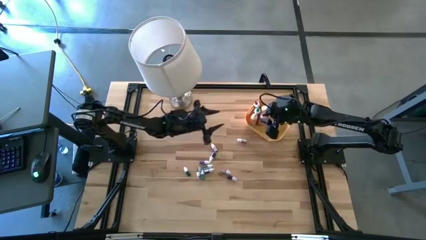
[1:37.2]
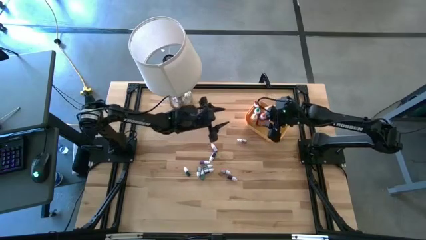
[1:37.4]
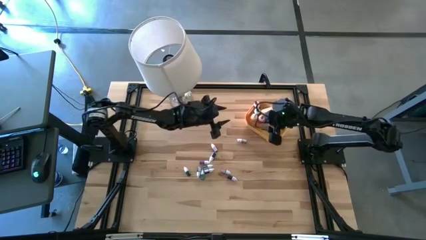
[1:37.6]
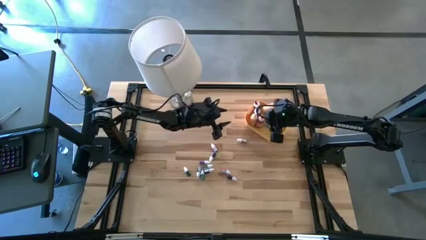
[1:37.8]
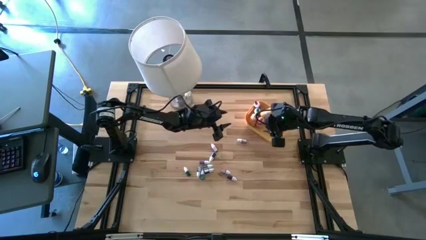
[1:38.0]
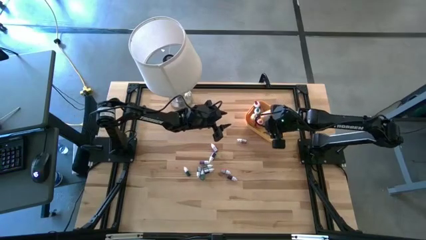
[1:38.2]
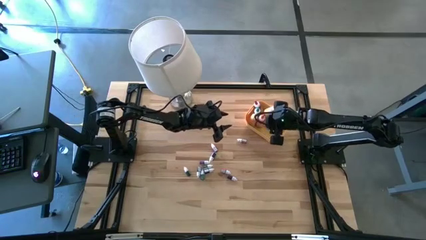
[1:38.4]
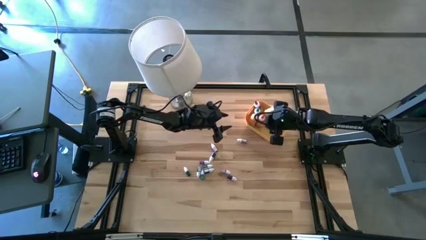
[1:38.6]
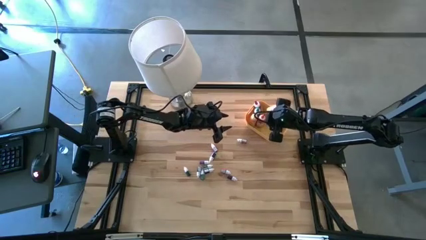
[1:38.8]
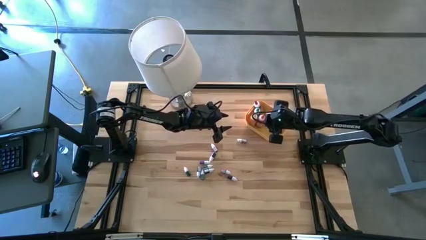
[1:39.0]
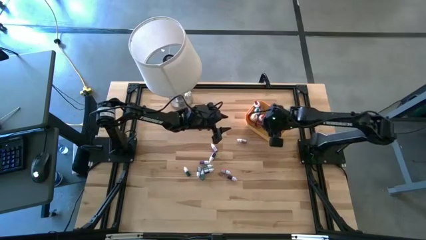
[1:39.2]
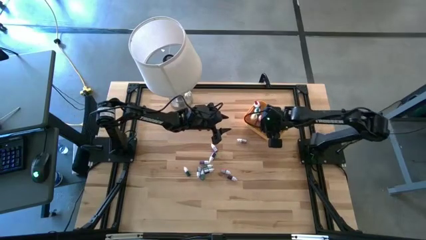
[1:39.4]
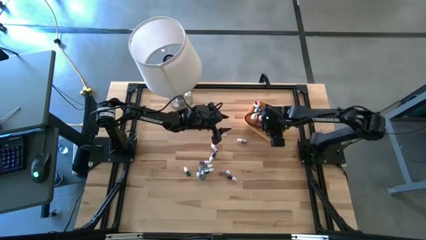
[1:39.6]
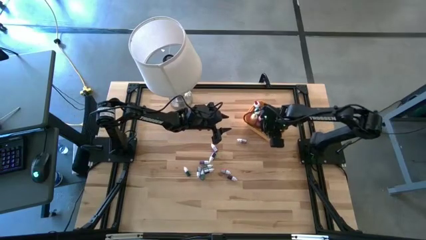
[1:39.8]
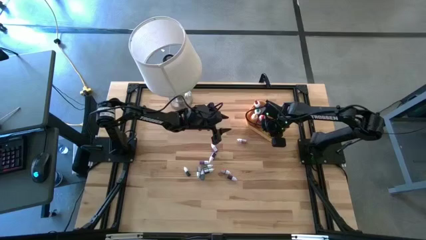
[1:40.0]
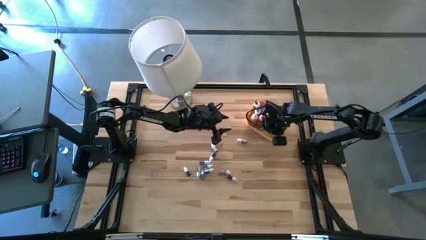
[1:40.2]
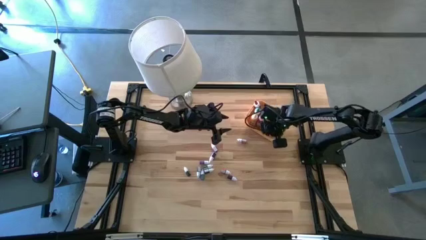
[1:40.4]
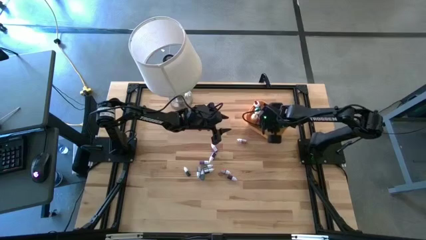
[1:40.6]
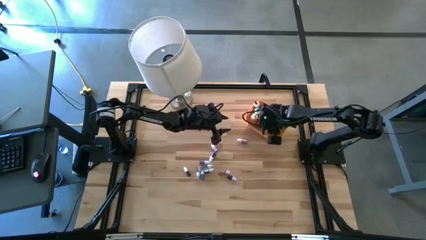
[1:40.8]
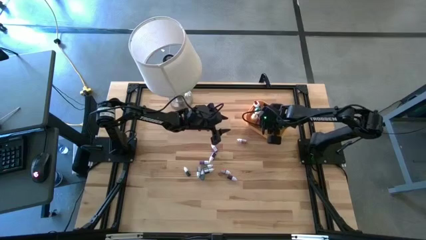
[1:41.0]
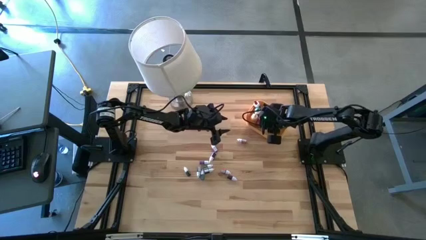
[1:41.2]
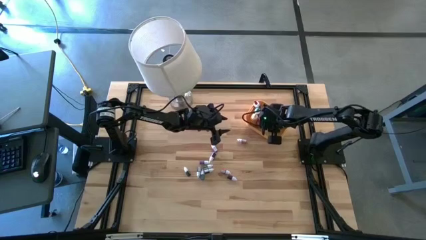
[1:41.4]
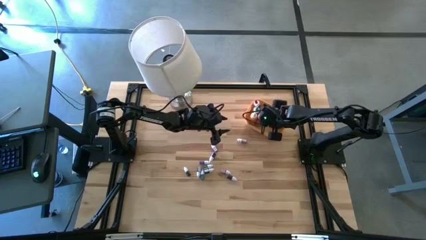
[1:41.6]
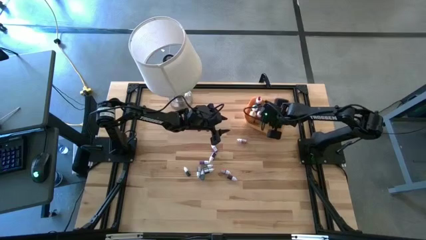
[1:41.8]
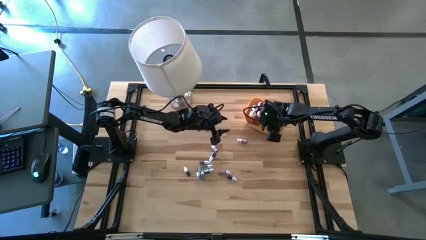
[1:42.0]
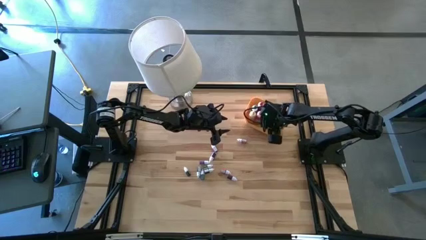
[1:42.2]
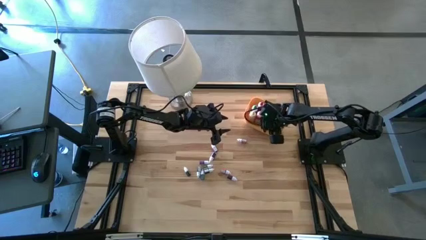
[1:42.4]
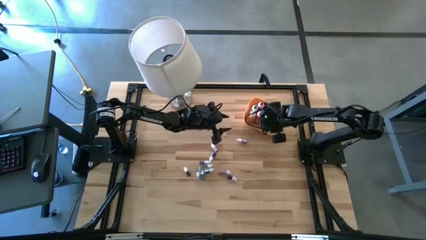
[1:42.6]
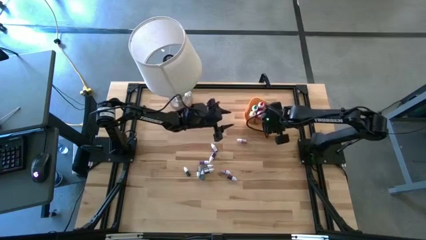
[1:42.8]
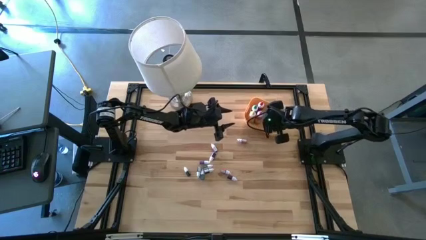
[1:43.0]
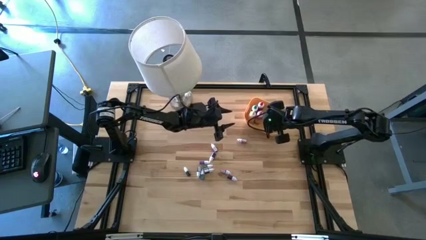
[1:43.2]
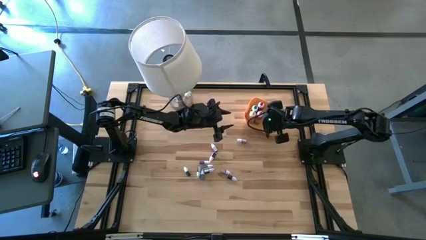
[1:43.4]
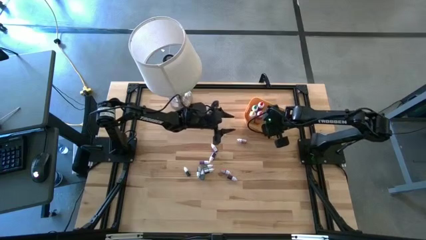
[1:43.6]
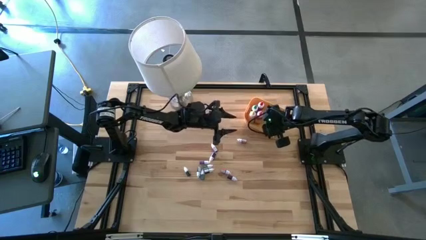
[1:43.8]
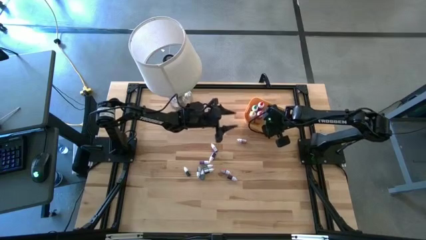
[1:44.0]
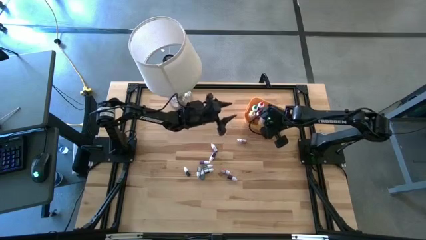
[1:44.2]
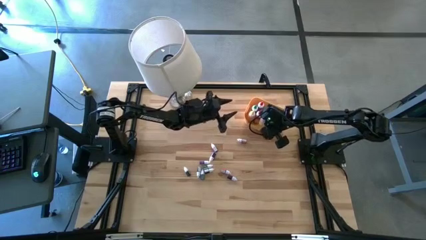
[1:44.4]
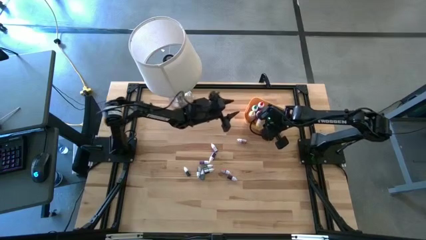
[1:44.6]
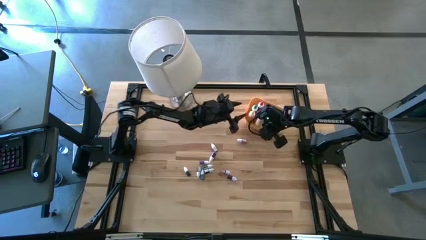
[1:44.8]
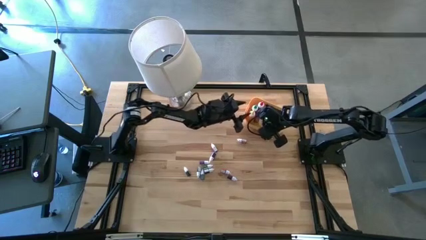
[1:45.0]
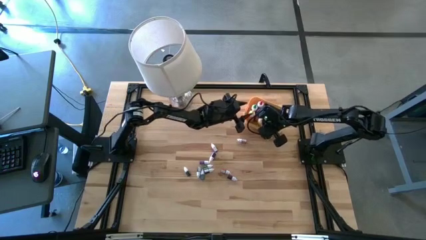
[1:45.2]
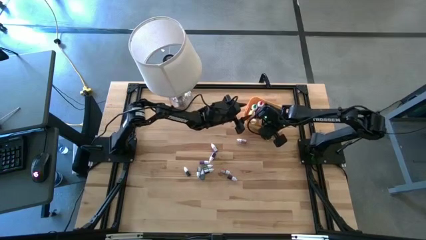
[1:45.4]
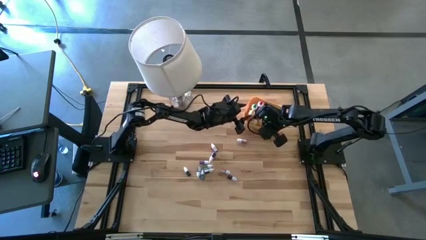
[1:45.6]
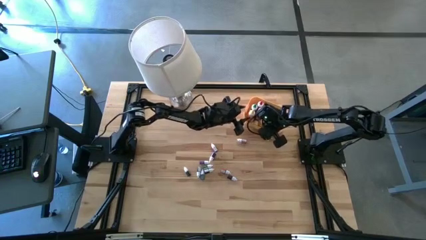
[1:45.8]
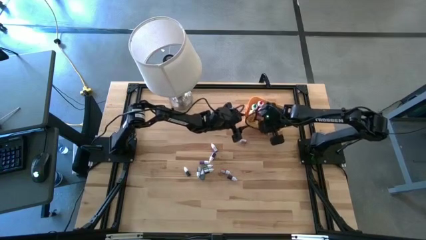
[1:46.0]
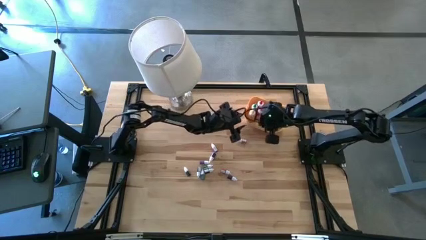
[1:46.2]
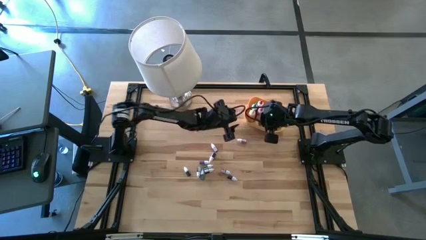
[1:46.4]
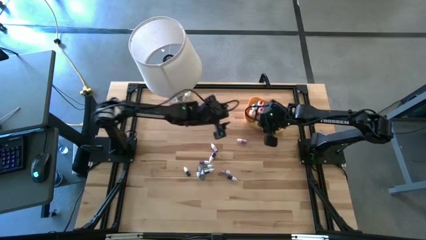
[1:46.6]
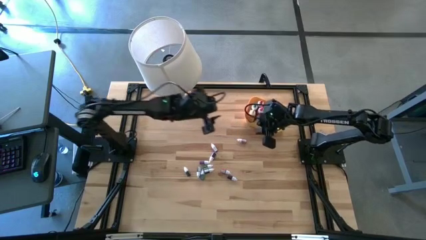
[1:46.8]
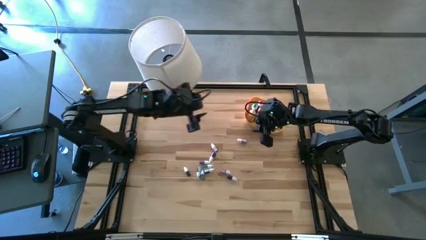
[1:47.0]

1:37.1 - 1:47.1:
Task: Pick & Place food coloring
Adjust the large yellow food coloring bottle in the yellow bin

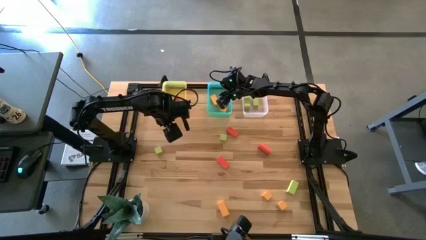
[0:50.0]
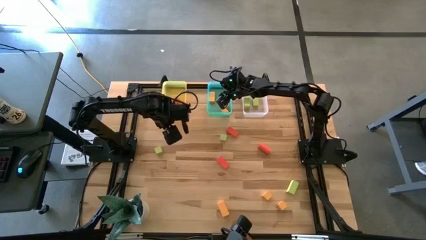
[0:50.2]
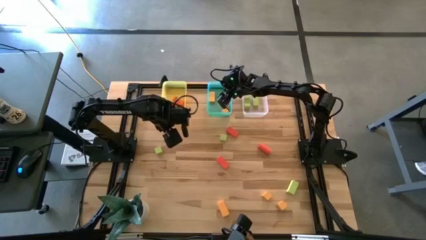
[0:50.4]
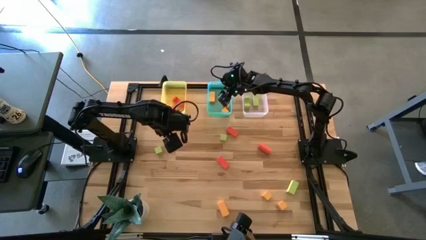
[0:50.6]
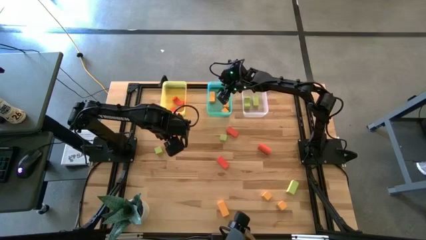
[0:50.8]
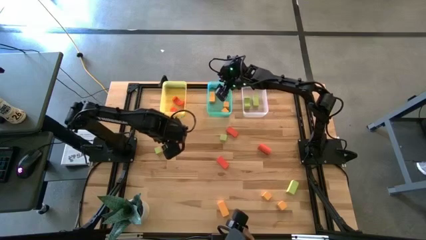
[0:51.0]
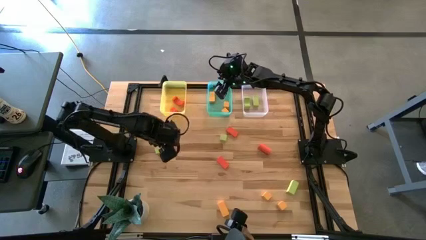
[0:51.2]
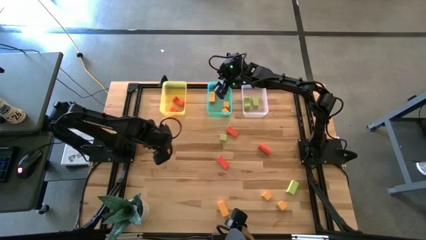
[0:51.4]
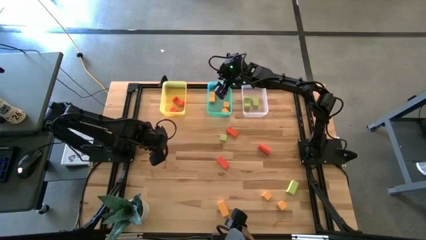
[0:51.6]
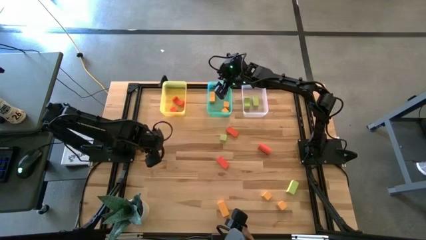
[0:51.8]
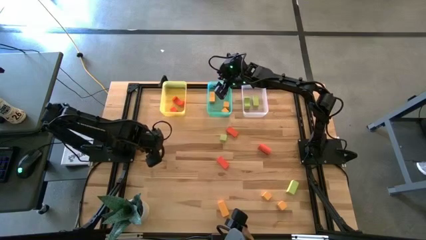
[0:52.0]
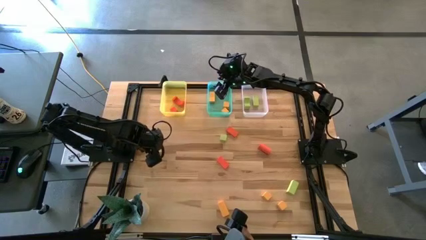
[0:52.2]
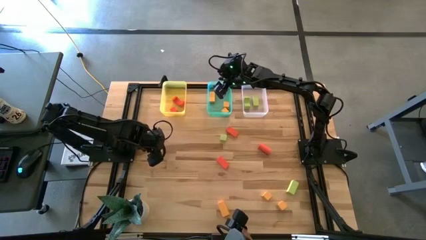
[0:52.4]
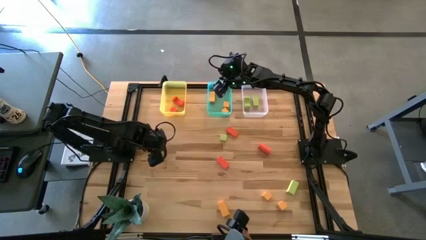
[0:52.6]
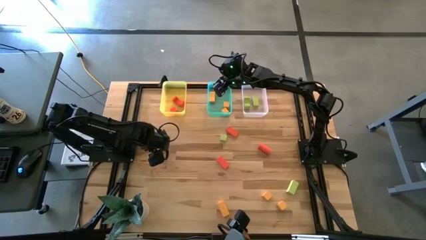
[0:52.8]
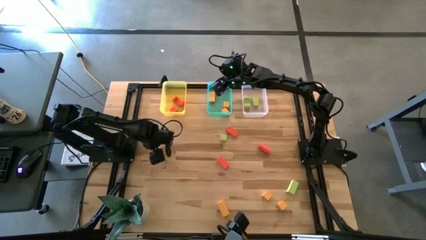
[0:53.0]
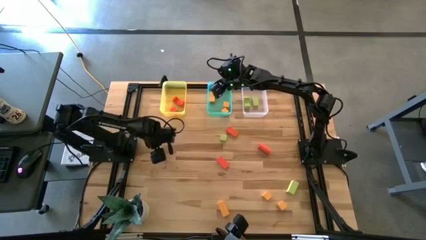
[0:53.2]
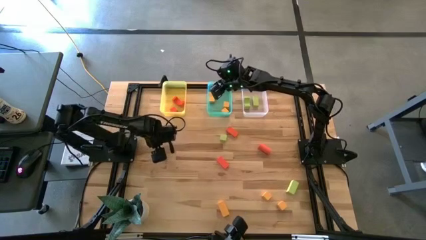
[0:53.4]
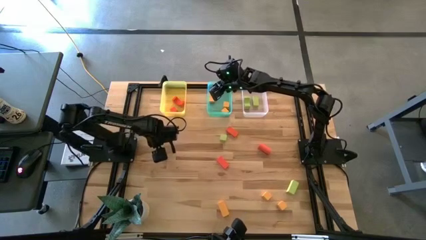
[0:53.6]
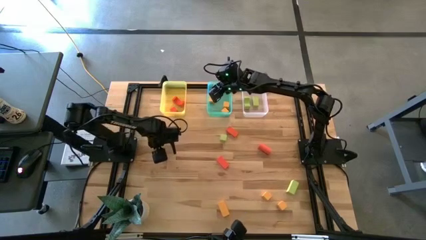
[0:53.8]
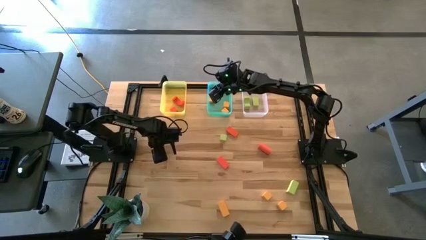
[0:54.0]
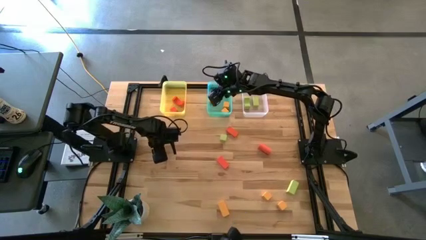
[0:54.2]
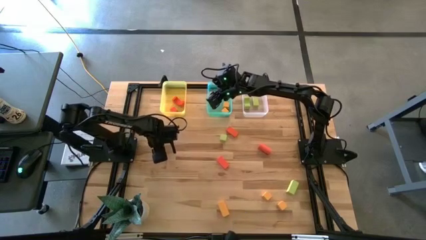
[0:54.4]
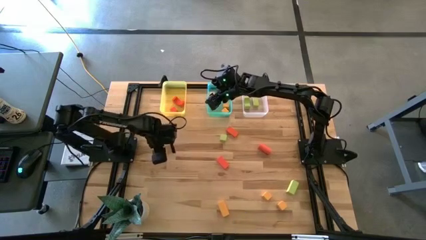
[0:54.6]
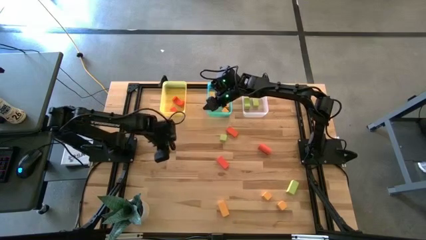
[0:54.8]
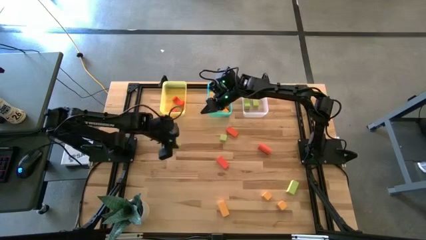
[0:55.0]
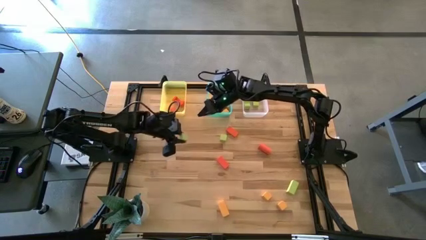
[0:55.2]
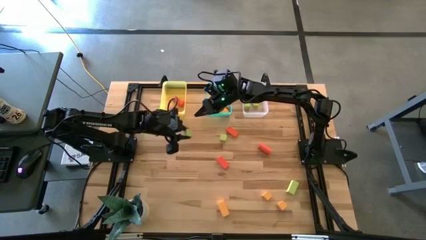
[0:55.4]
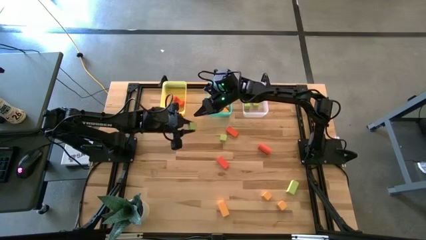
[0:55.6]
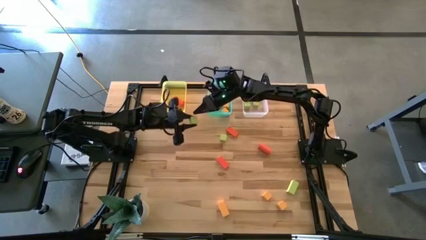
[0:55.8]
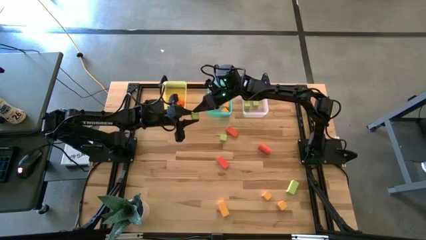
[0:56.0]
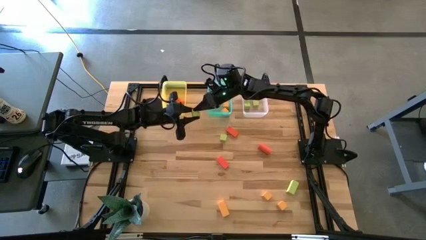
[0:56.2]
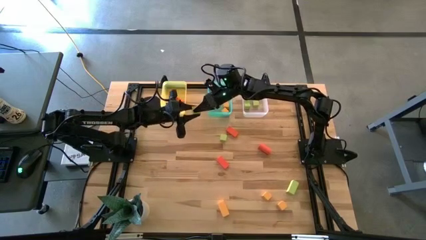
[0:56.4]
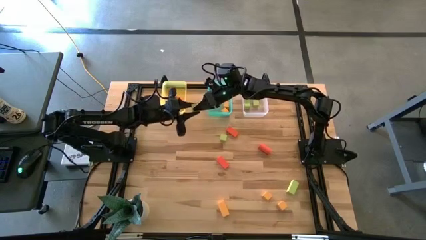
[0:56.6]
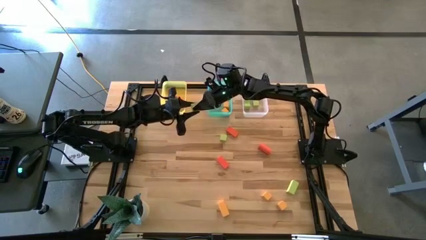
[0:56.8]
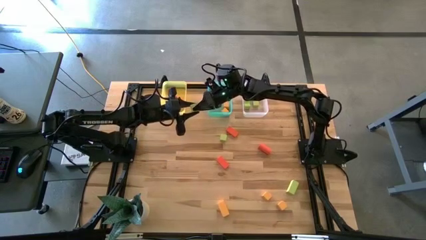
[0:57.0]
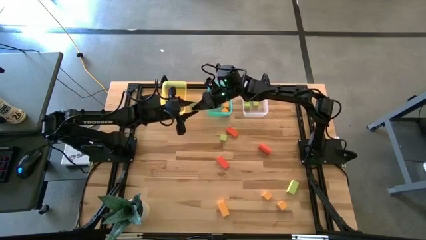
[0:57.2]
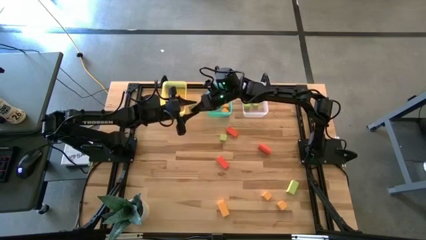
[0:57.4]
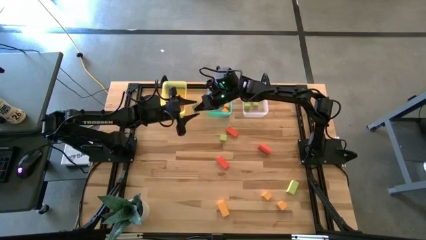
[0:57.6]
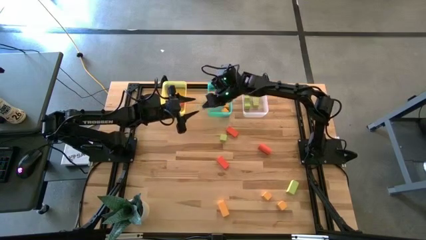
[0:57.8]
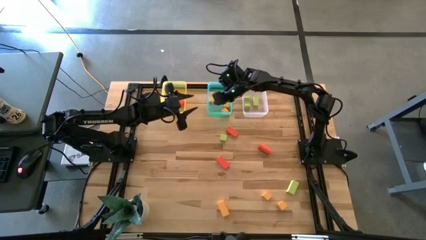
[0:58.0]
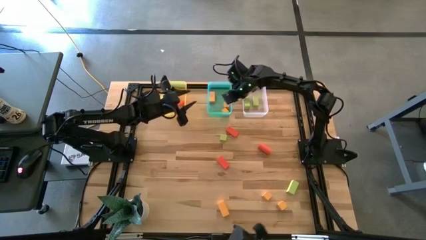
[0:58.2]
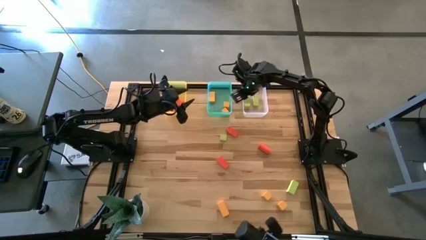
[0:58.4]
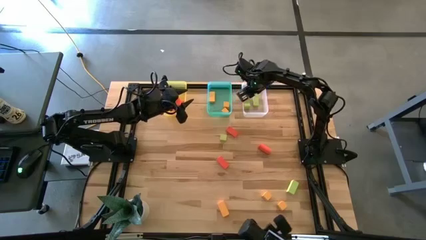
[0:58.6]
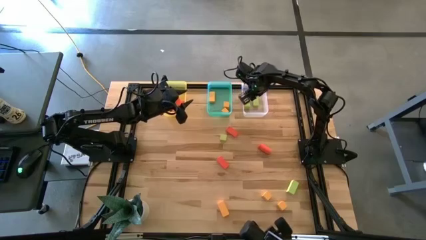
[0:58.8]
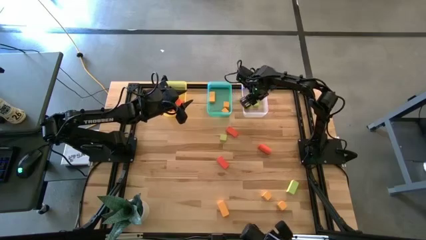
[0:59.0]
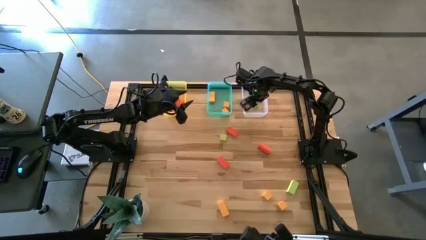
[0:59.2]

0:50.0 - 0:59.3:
Task: Sort & place blocks by color
Put the green block into the transparent bin
